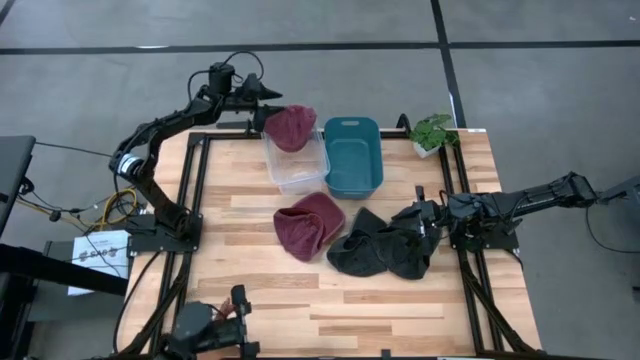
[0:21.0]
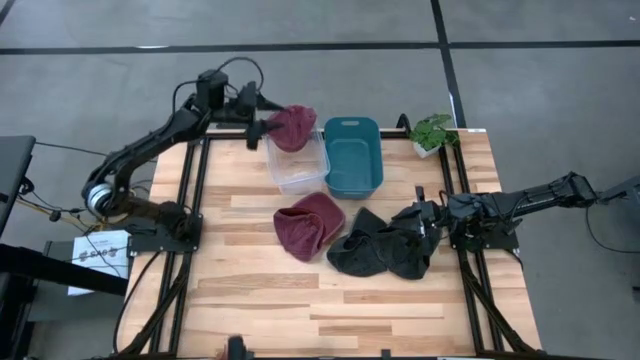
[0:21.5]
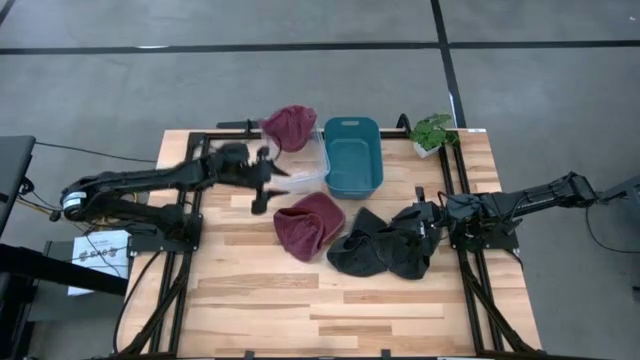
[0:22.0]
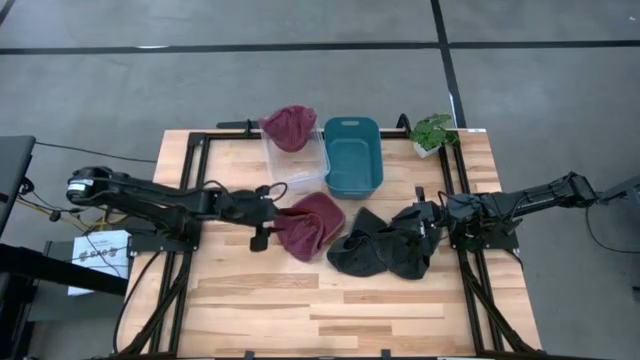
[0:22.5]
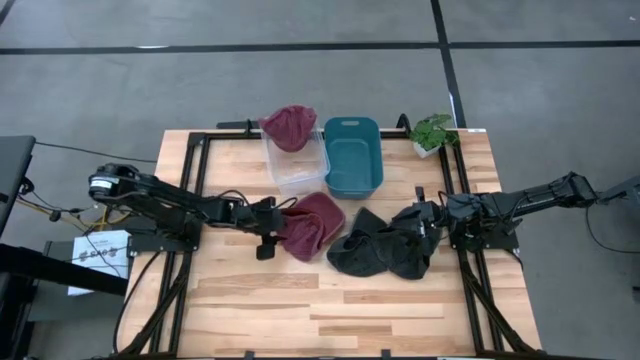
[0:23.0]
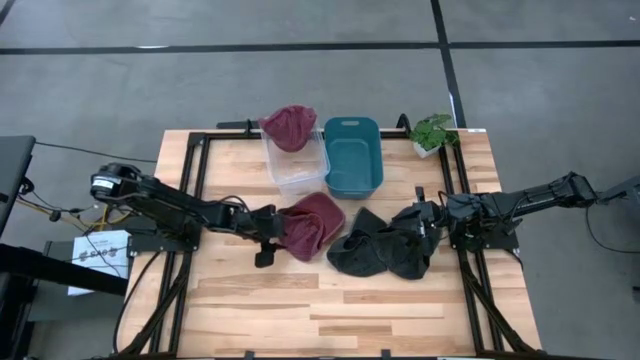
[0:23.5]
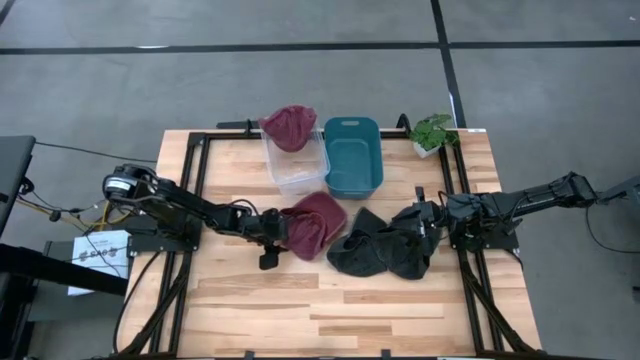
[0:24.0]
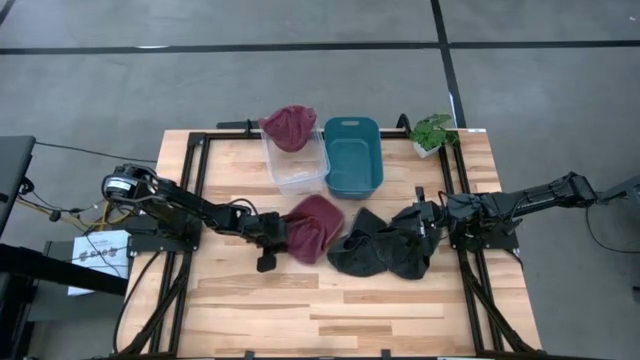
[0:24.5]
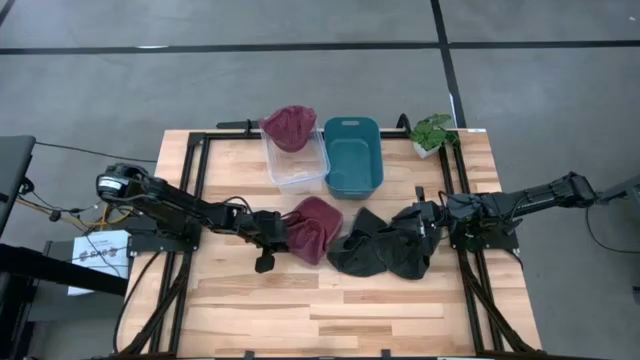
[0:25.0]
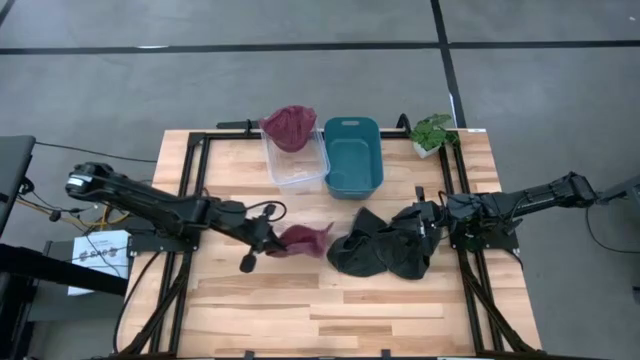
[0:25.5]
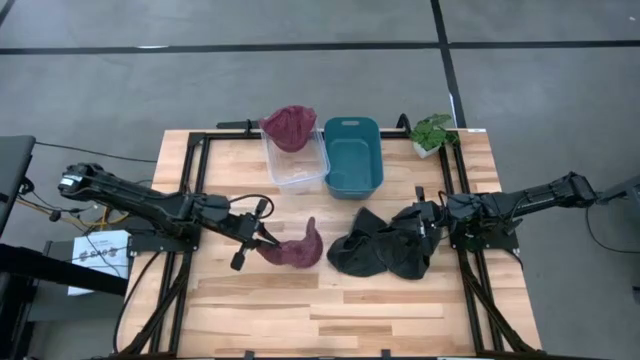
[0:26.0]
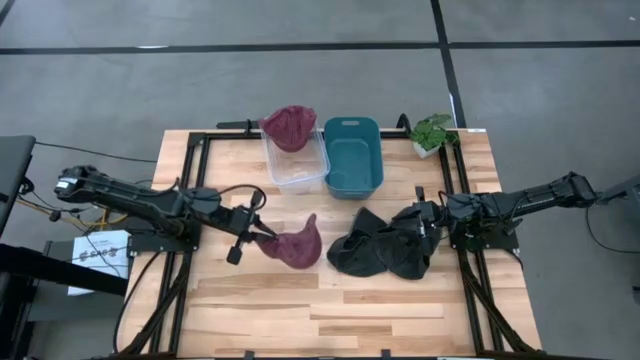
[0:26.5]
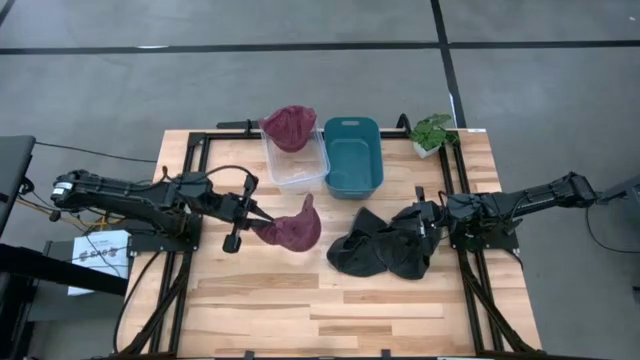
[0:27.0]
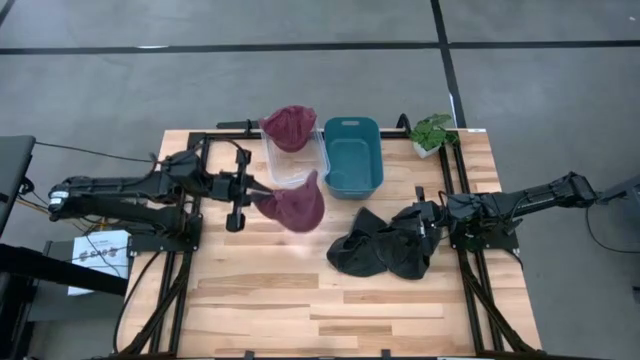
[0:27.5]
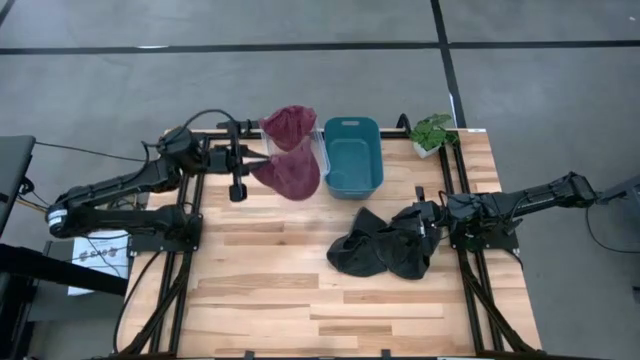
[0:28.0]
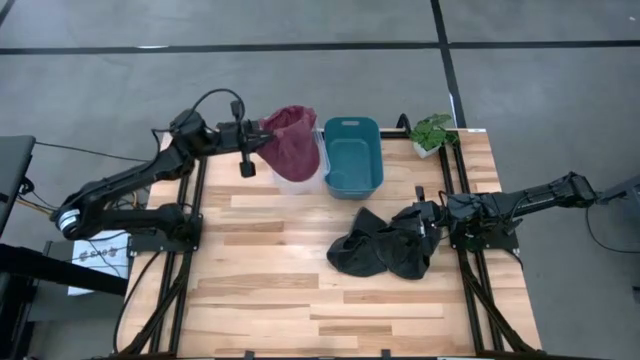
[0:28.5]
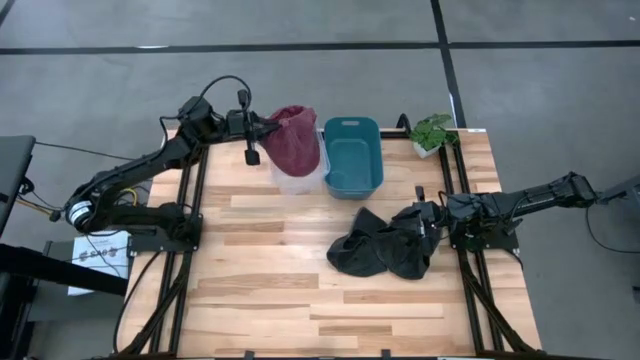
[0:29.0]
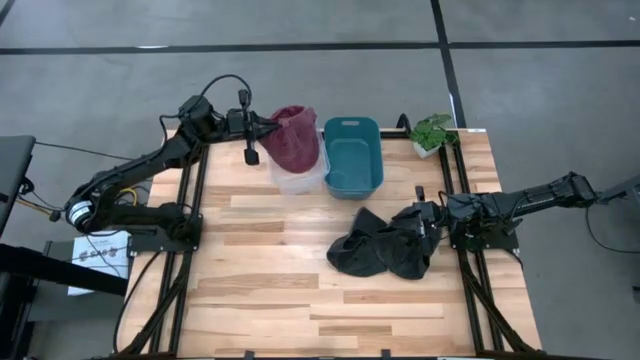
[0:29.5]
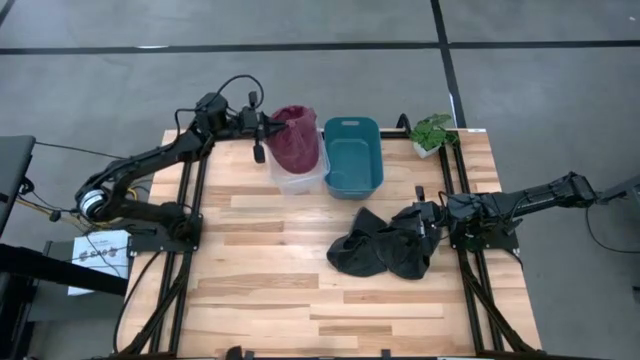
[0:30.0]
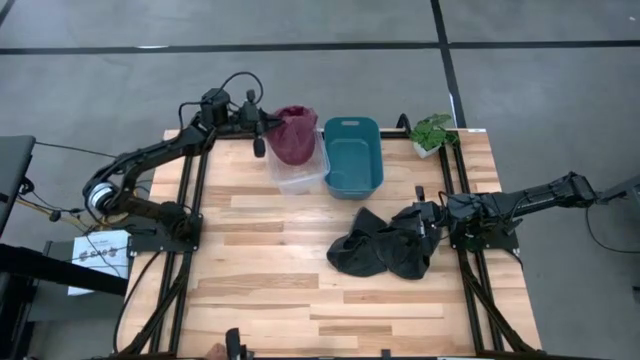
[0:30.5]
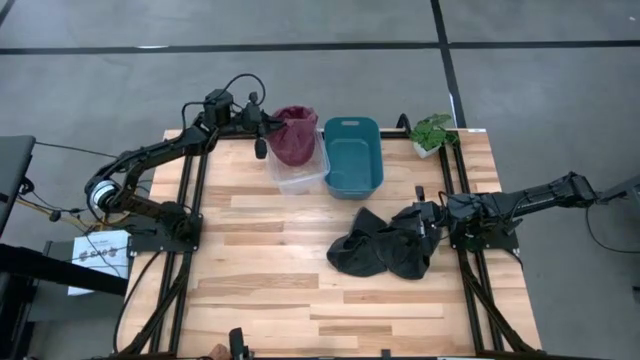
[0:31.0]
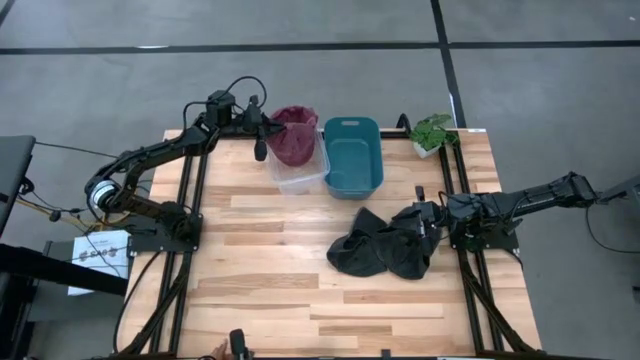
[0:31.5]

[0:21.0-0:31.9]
Task: Pick & Place hat
Put the red cap into the transparent bin

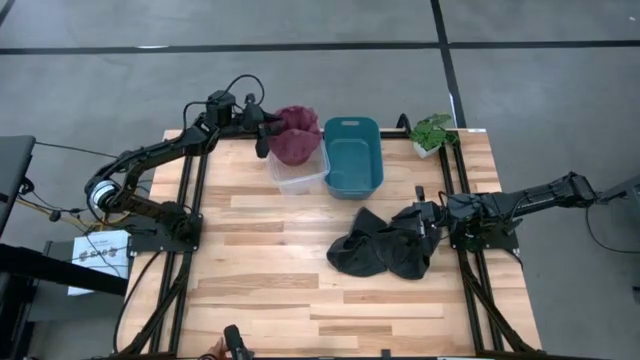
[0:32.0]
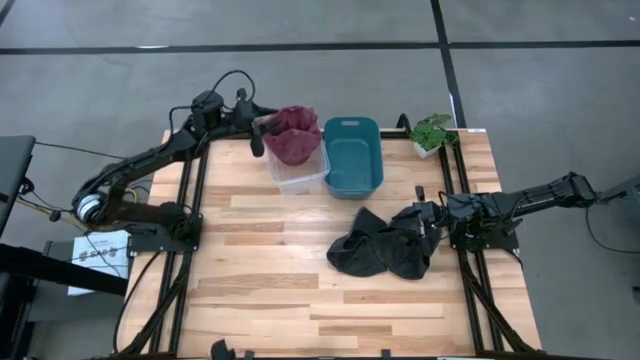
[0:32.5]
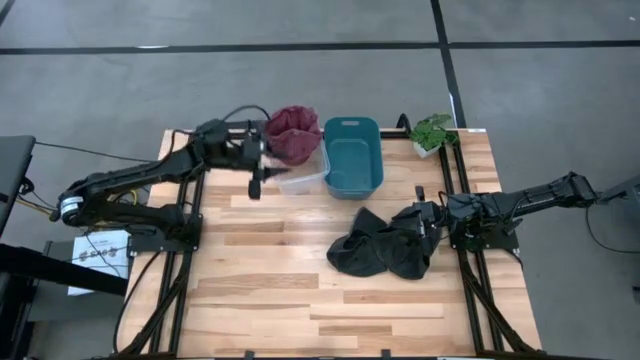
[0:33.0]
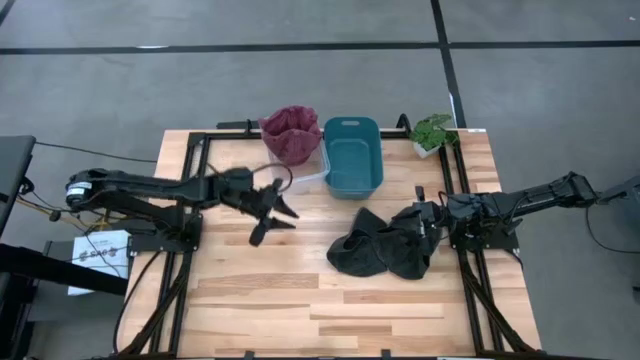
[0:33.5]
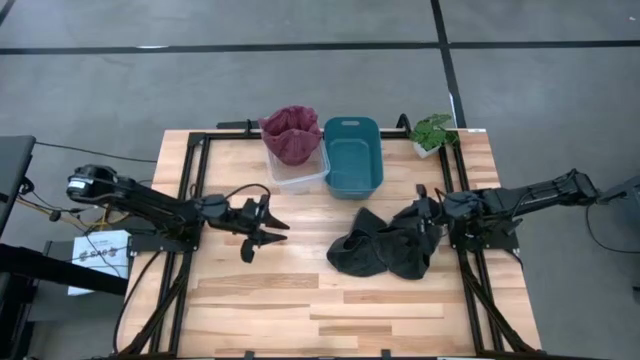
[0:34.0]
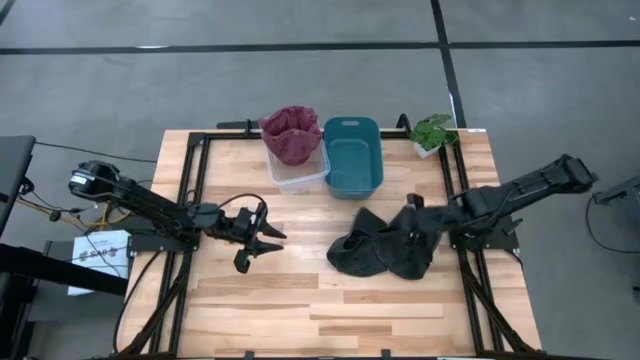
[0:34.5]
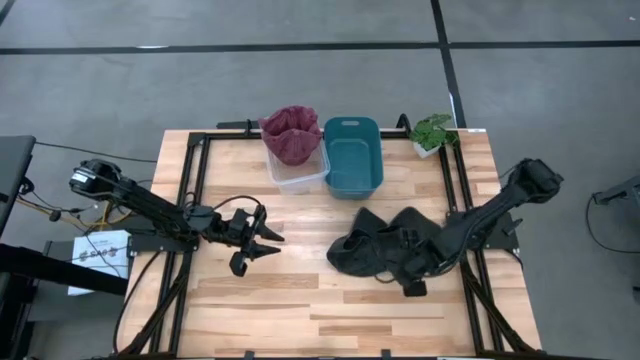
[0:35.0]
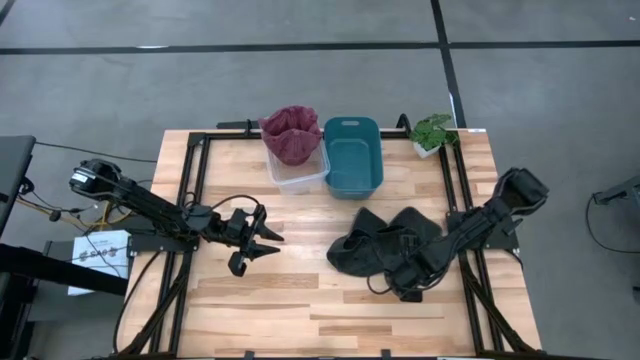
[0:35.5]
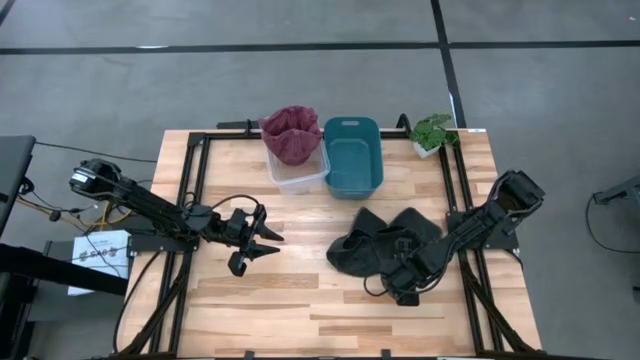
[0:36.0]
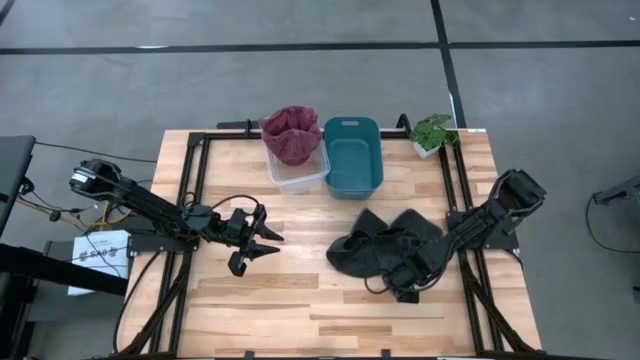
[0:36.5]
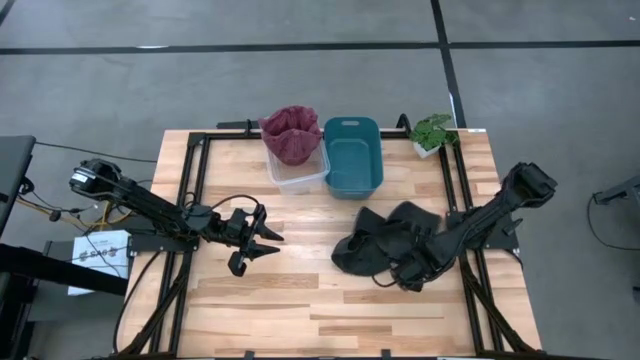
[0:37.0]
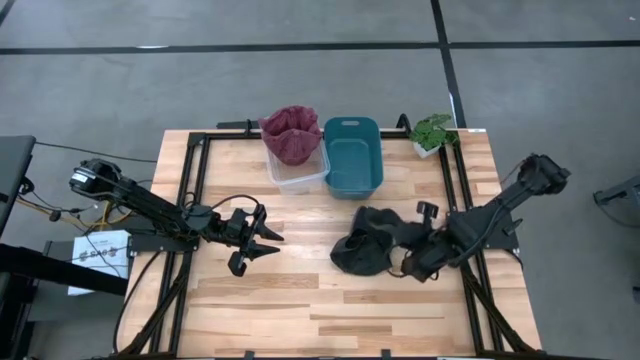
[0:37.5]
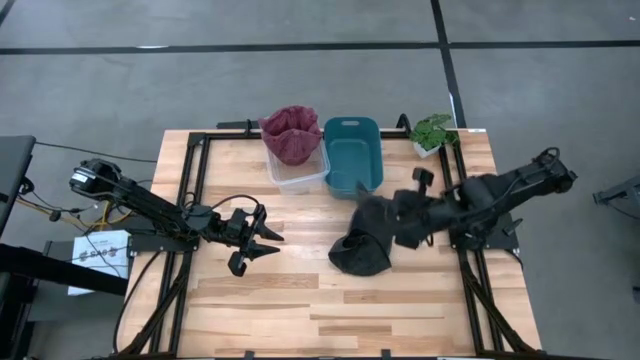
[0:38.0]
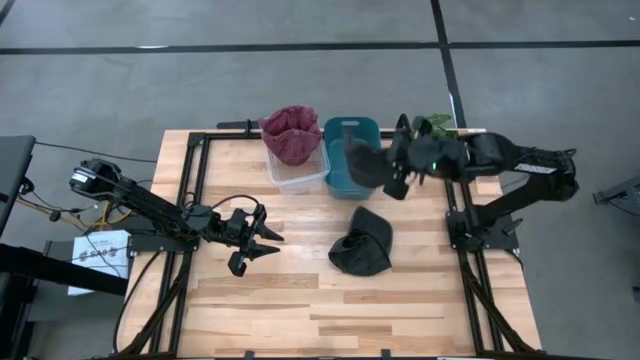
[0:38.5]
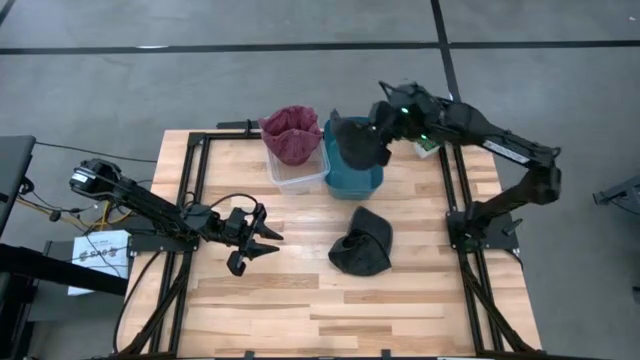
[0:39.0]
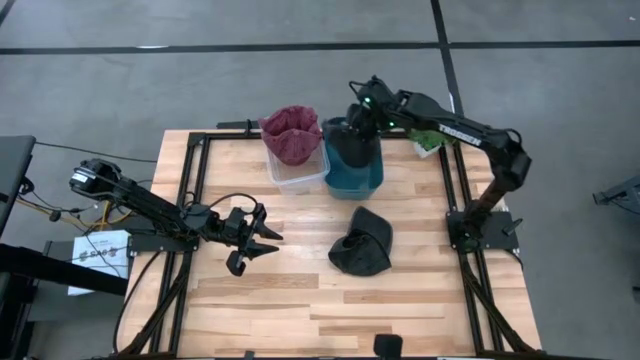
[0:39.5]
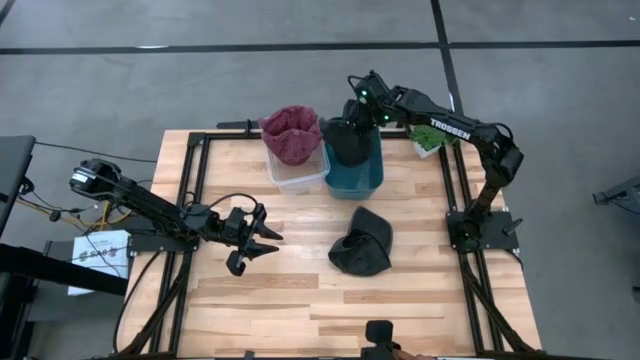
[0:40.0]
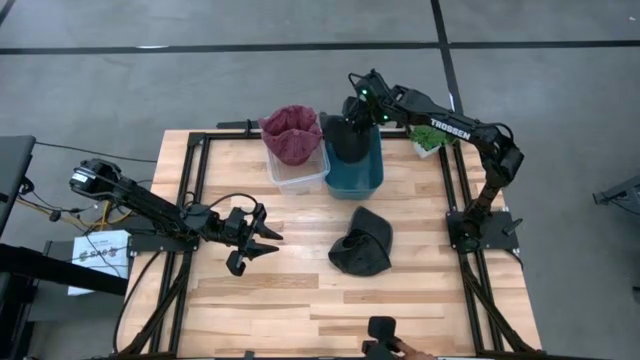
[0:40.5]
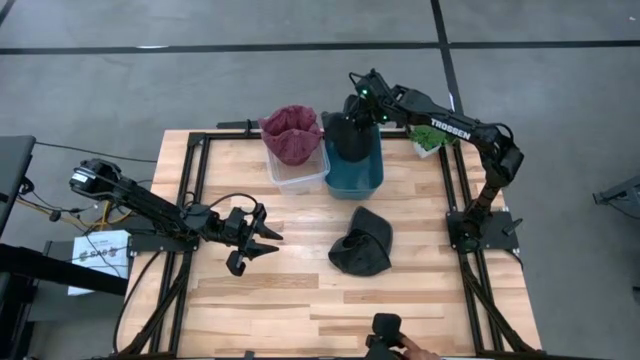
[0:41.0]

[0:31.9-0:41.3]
Put the right black cap into the blue bin
